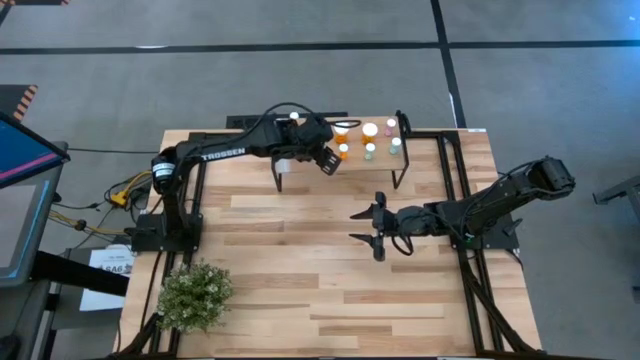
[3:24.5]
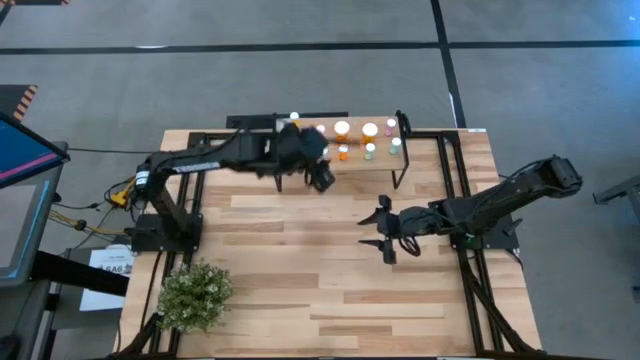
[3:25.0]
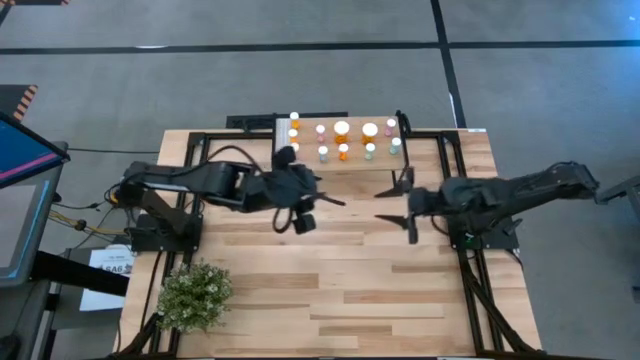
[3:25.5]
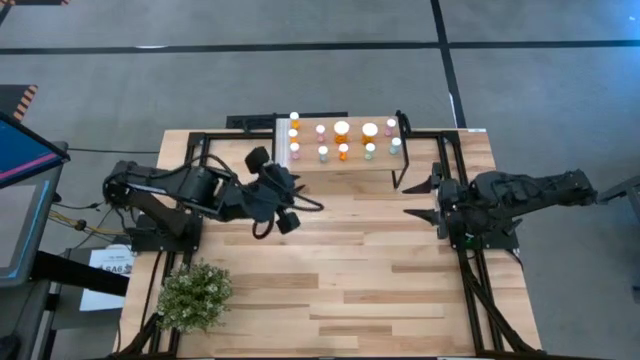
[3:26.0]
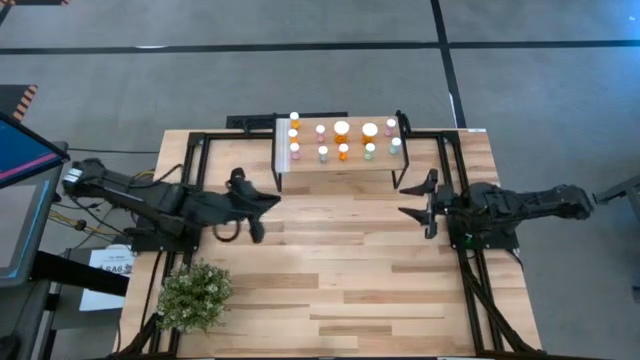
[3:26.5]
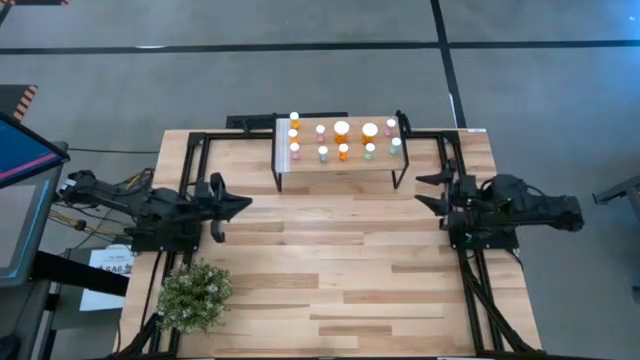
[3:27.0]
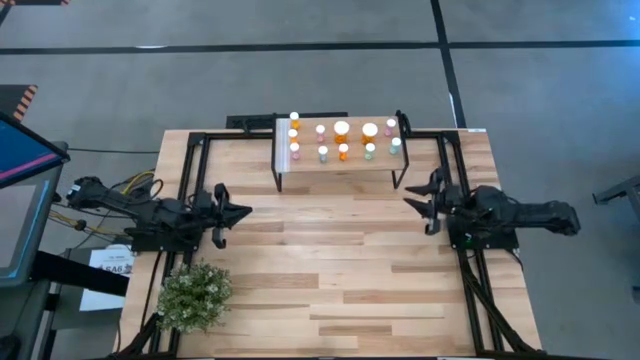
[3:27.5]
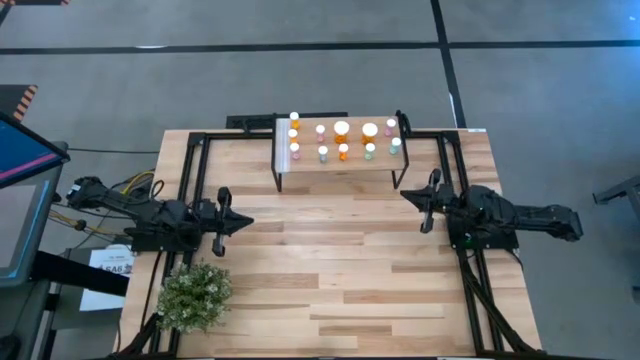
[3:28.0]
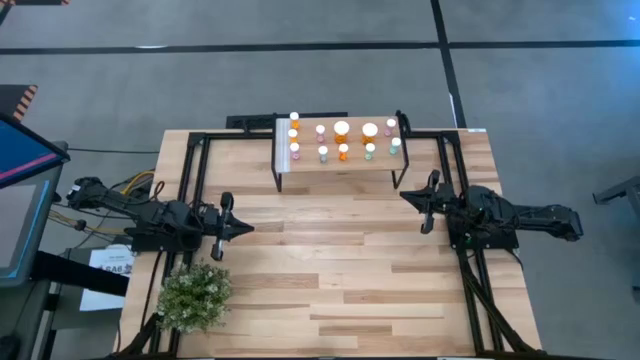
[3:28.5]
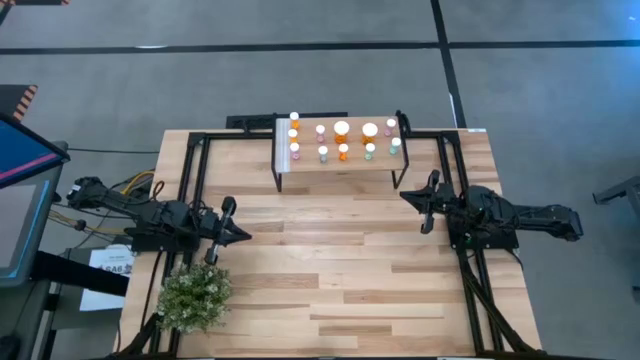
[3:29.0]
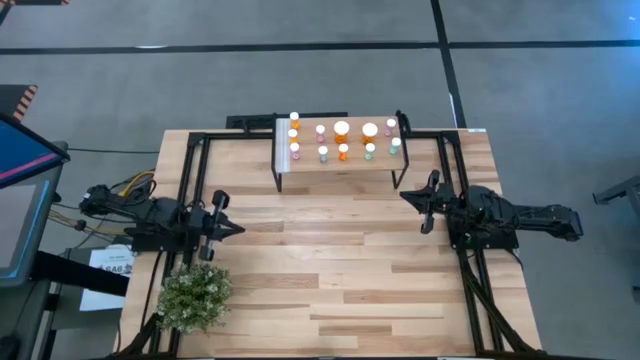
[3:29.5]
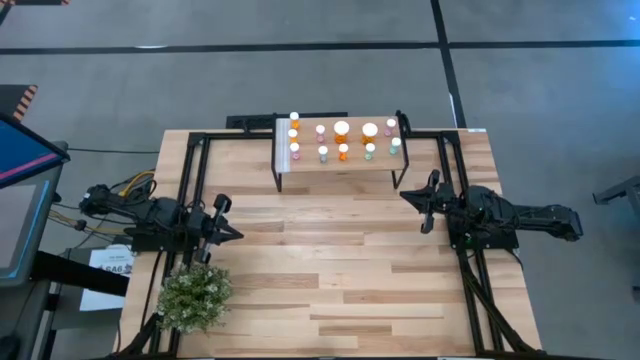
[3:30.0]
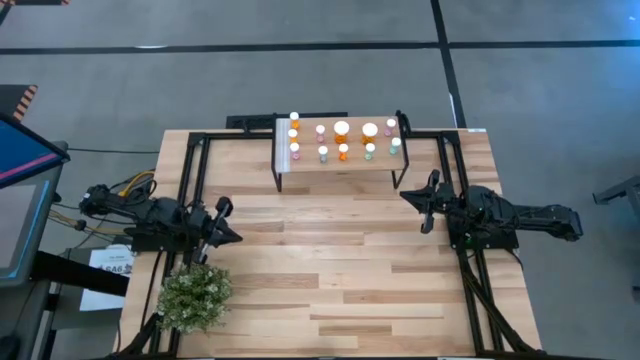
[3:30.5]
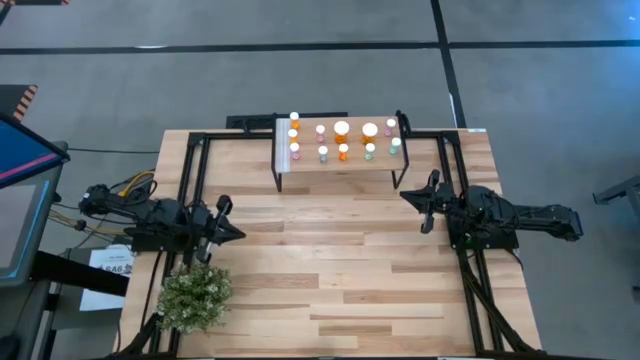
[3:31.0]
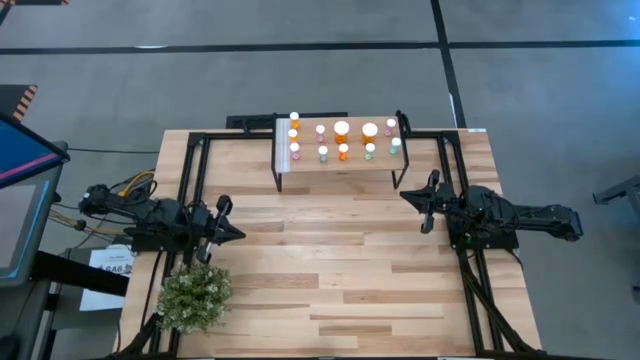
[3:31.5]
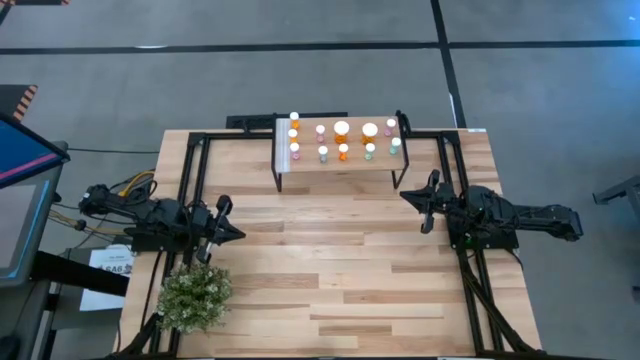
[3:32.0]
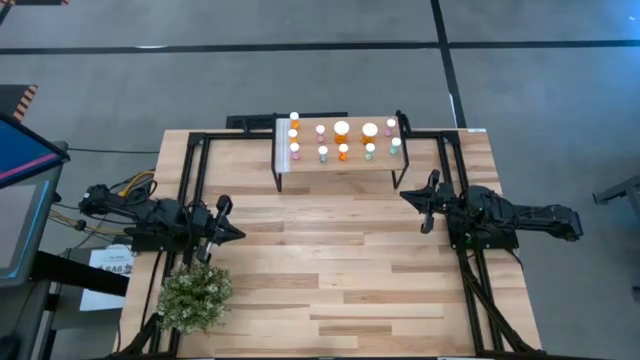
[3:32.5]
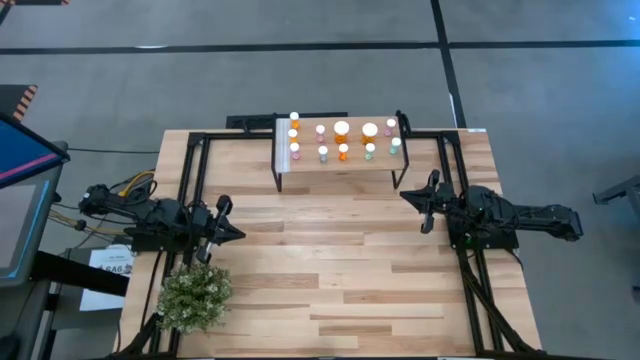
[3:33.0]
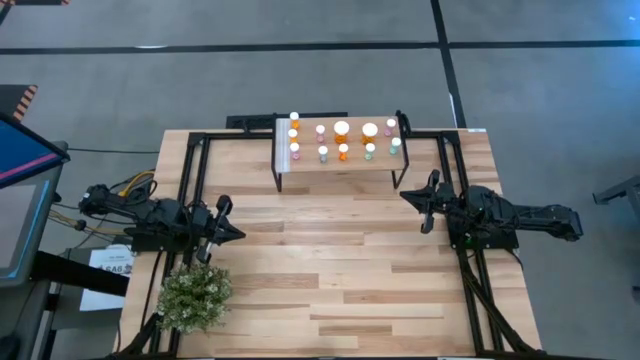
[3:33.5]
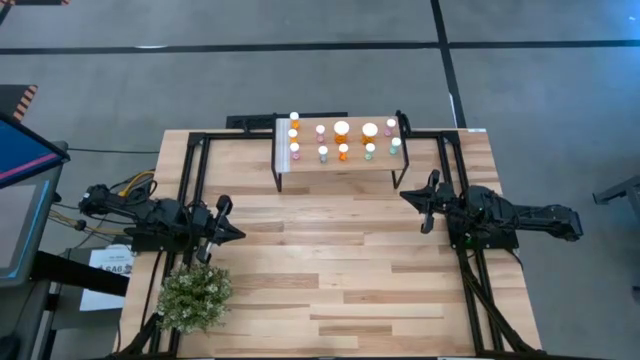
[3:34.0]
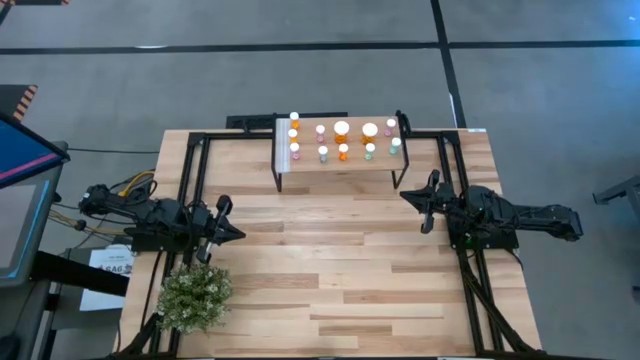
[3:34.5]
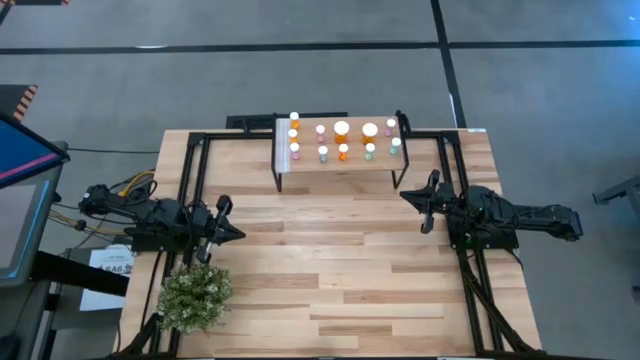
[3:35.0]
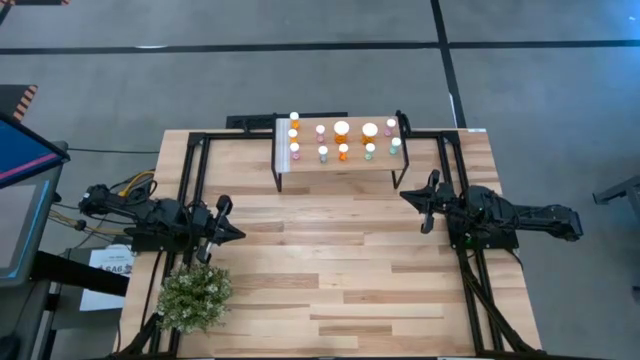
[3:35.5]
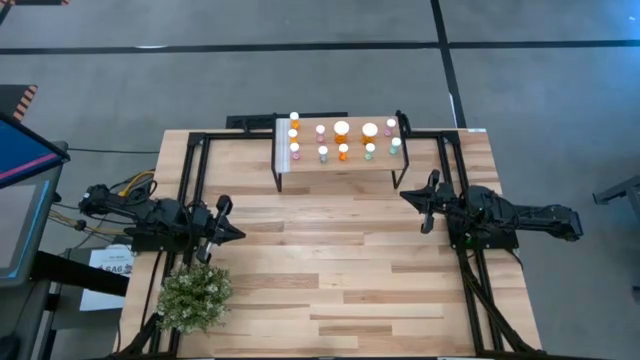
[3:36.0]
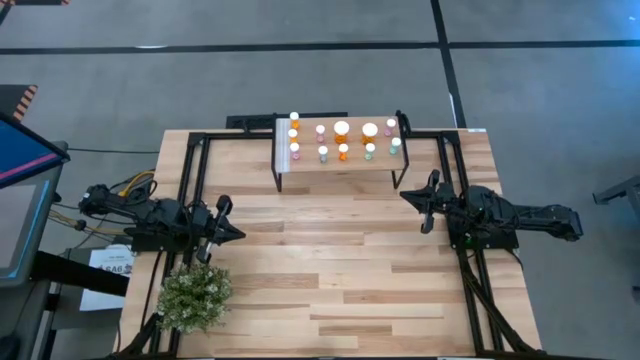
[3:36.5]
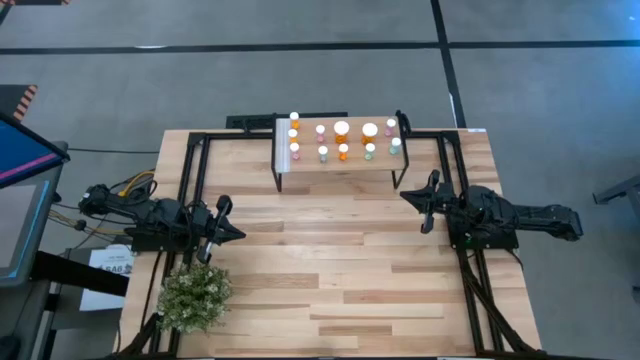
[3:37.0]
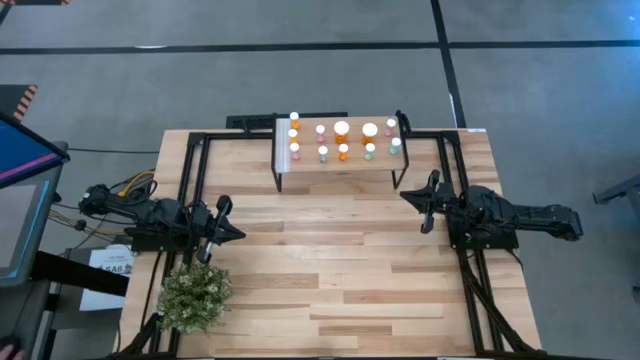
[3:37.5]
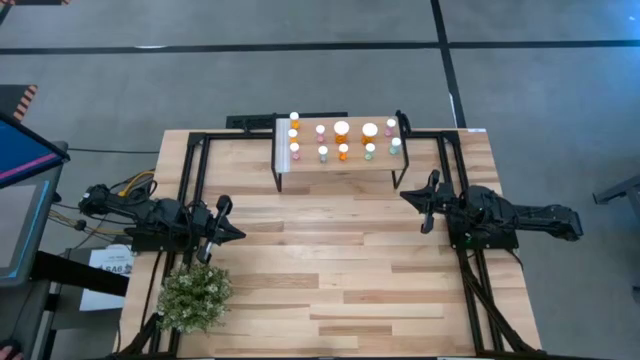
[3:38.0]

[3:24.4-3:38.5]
Task: Pick and place medicine bottles onto shelf by color
Return to Home Position
